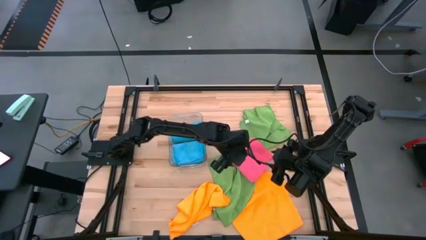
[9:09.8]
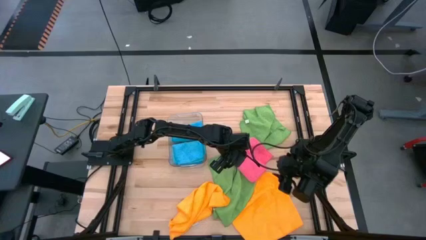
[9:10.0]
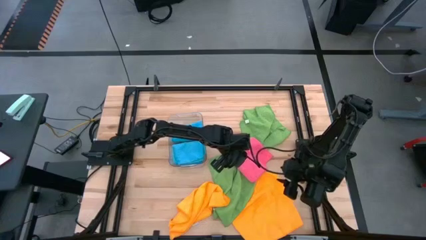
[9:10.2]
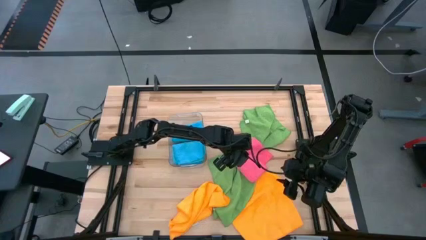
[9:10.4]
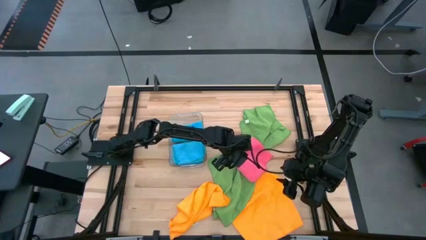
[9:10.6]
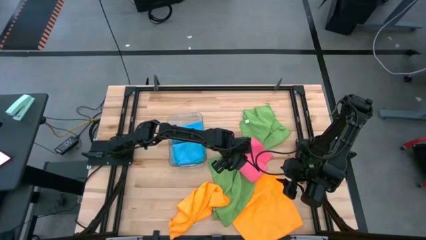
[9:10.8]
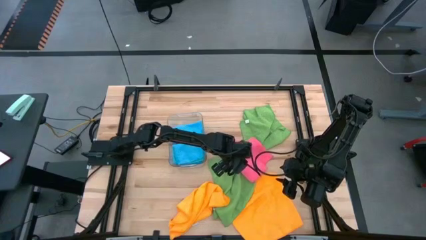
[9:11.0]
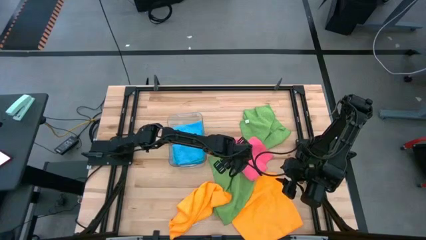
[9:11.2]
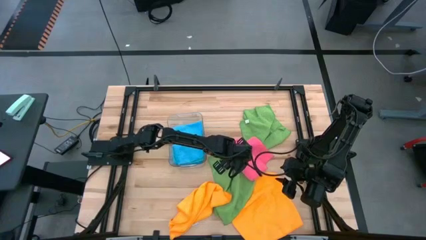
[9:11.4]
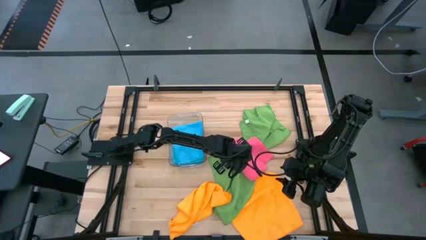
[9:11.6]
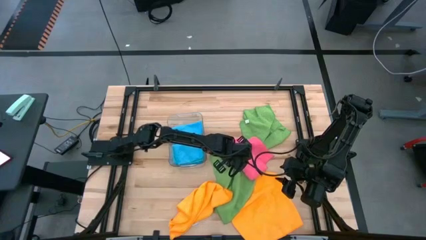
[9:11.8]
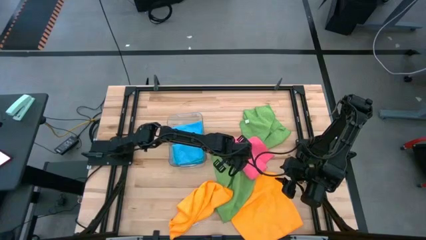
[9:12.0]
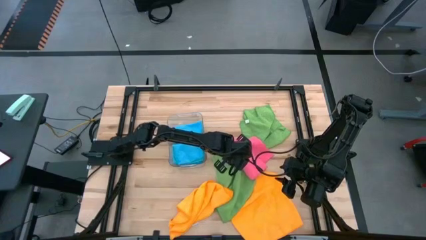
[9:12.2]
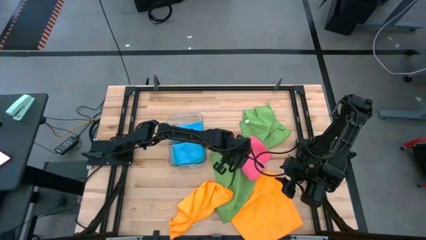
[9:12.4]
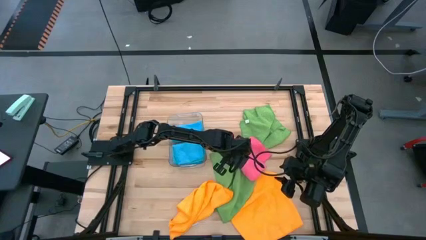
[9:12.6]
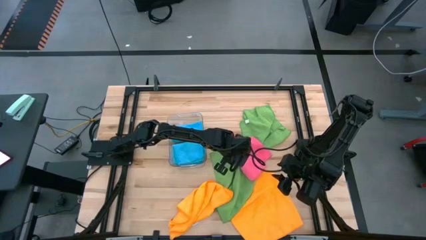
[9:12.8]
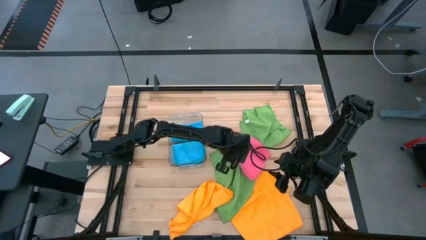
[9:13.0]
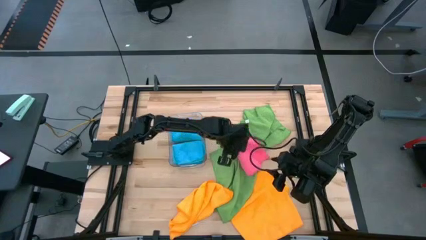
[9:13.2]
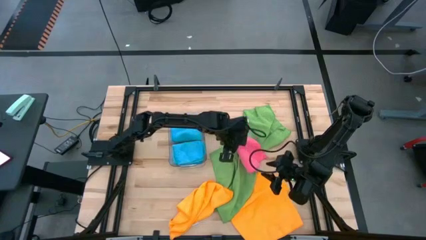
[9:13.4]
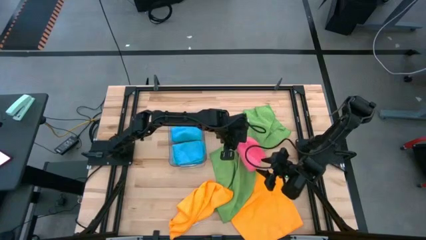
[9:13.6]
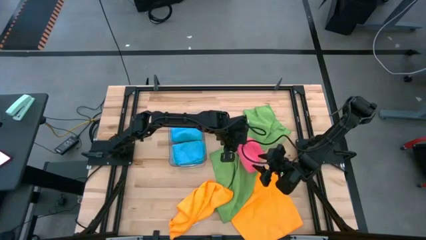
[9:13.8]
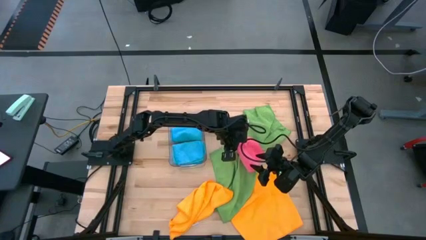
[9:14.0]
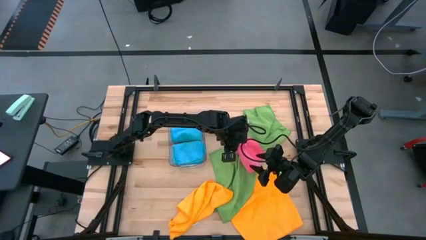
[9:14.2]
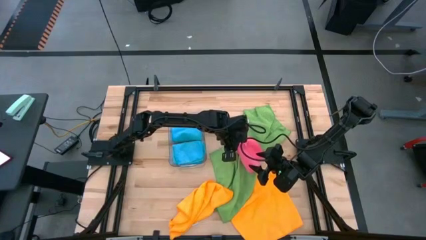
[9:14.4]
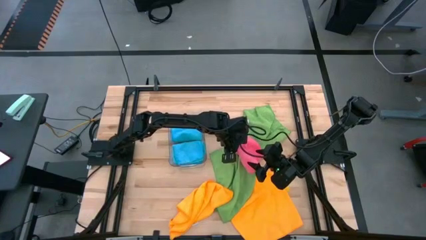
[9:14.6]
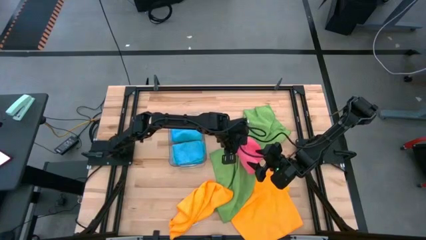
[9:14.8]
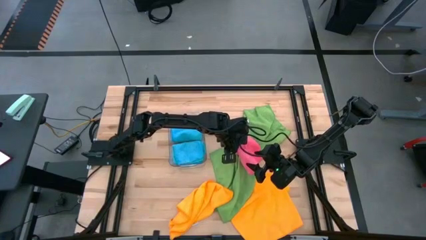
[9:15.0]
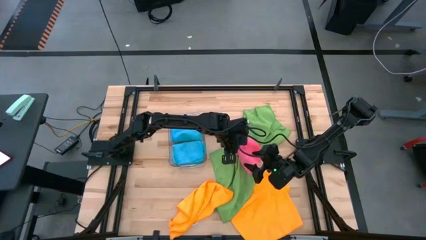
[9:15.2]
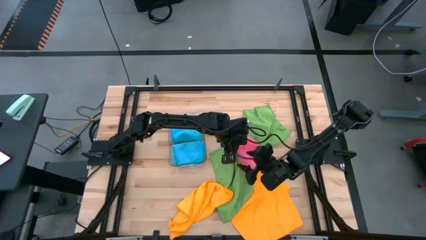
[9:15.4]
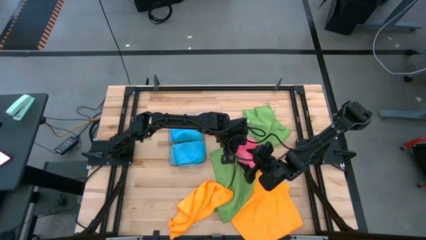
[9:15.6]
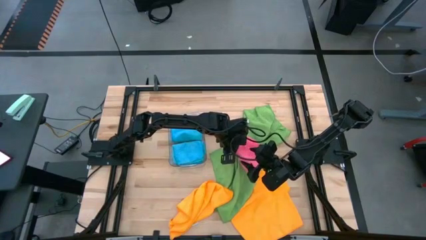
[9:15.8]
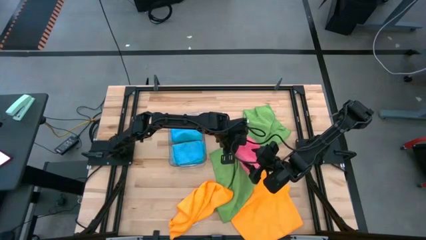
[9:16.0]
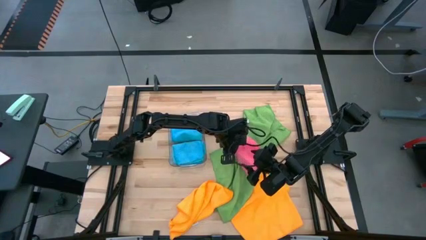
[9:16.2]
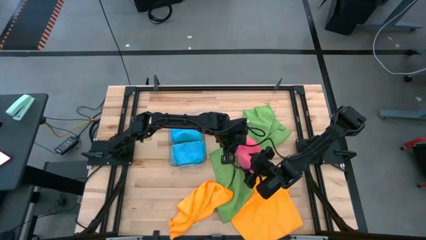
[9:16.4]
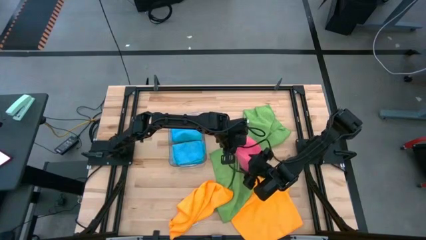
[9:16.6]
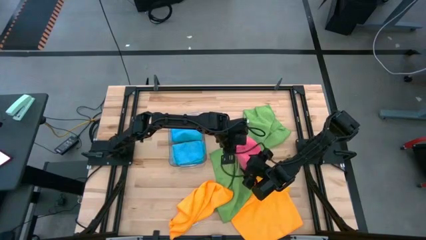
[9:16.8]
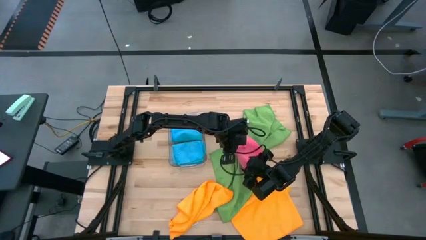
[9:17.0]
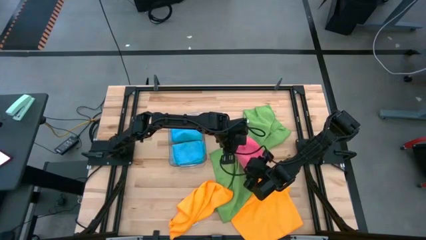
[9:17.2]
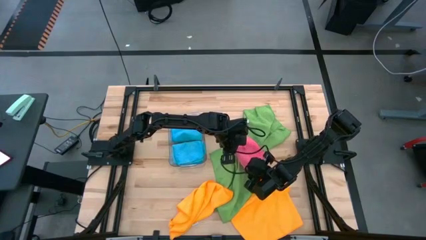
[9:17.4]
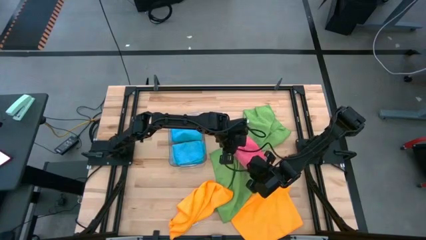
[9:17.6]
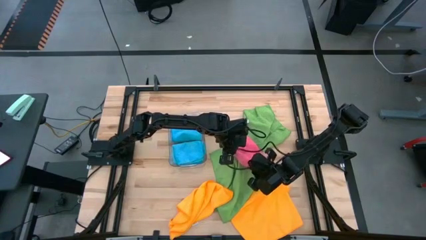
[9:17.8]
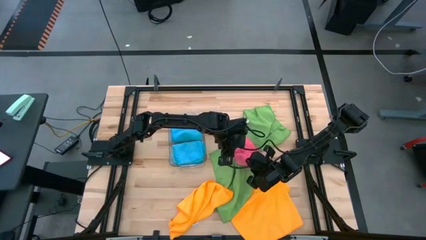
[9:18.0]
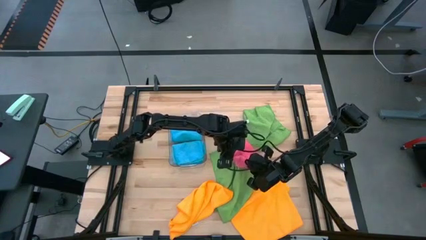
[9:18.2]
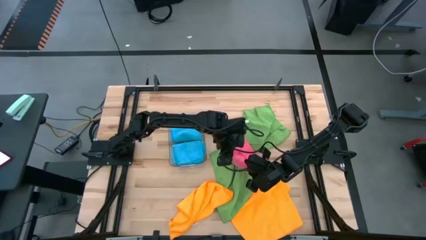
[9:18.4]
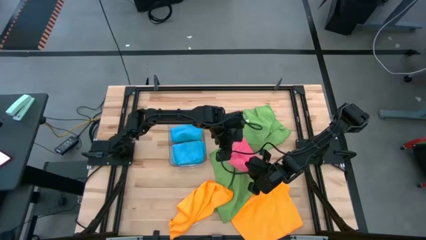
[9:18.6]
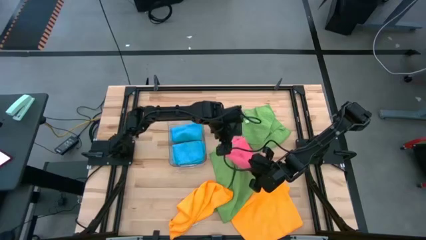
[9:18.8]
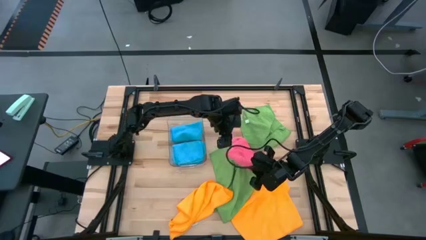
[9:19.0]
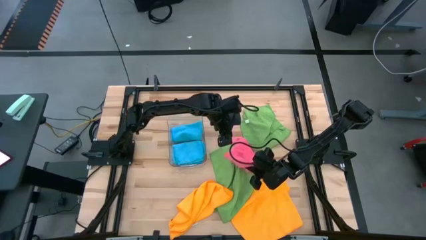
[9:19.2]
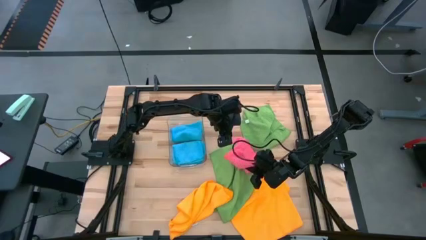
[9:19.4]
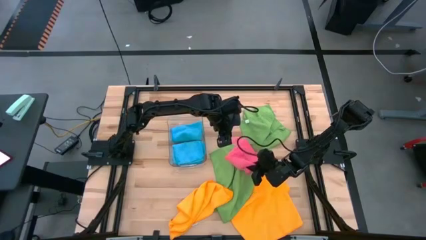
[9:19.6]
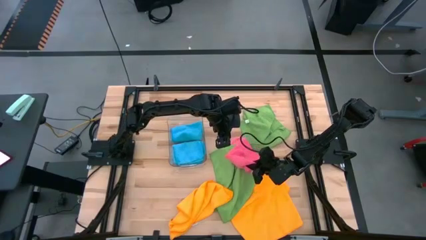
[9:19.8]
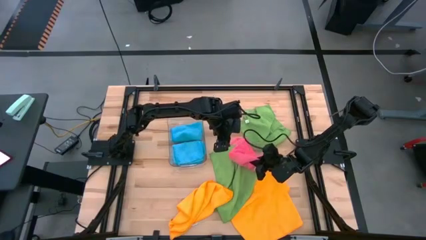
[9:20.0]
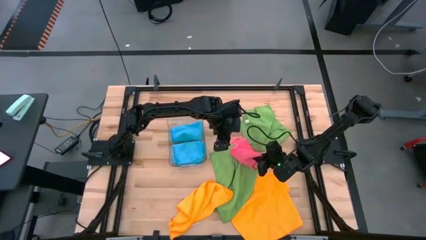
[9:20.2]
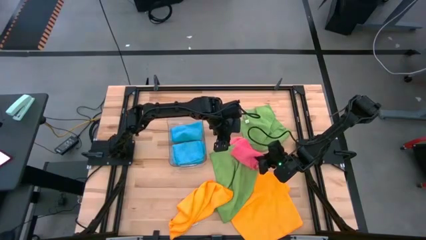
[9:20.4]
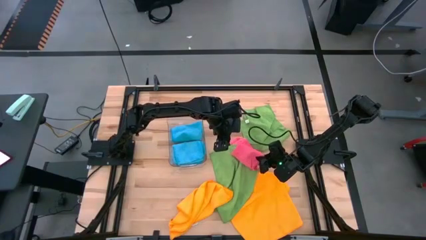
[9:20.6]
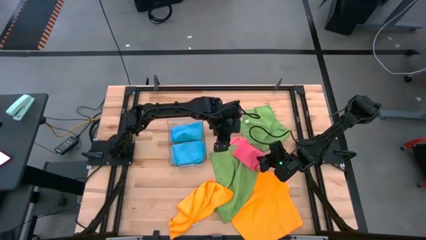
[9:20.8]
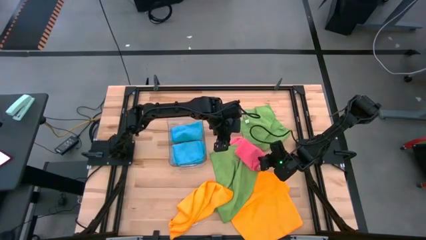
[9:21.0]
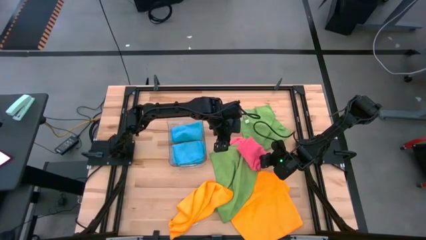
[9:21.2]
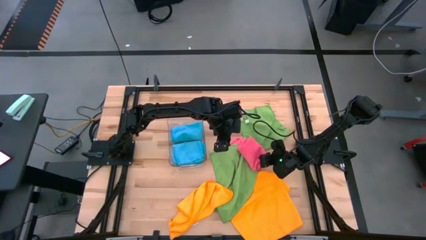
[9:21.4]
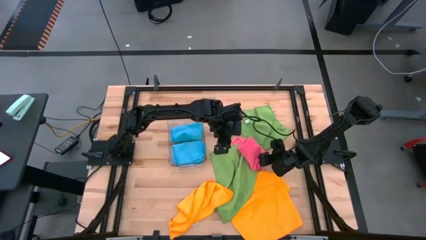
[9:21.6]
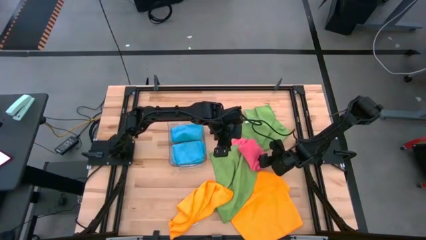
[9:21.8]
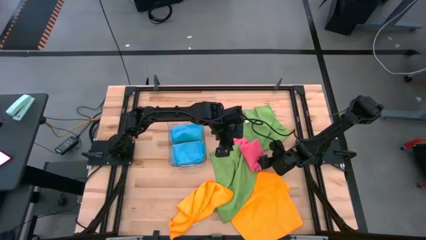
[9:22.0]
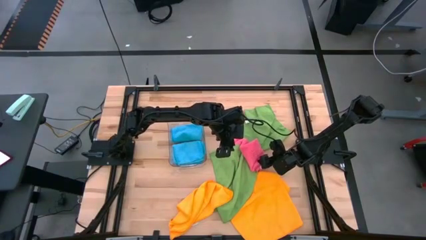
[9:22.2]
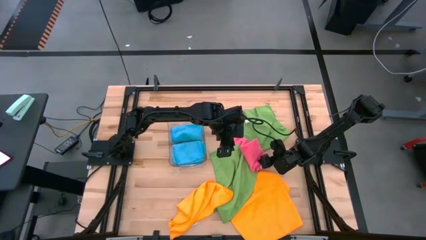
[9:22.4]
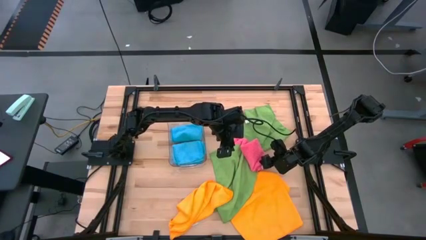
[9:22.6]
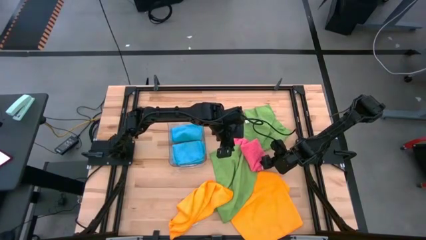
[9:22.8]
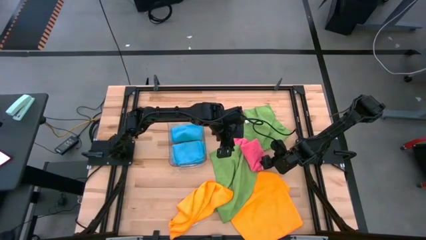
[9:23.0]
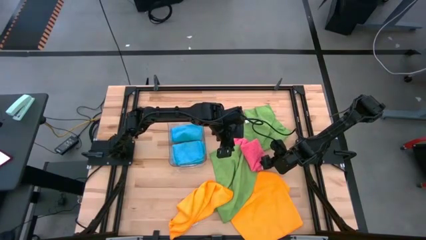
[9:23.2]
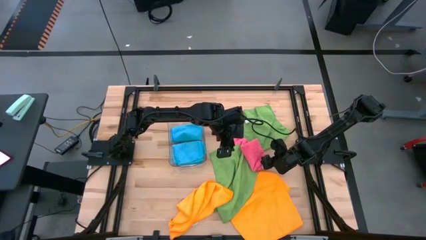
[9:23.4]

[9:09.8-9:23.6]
Task: Fold microfiber towels
Fold the top pink towel
